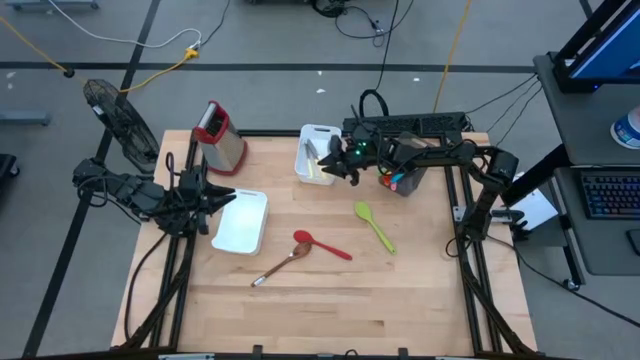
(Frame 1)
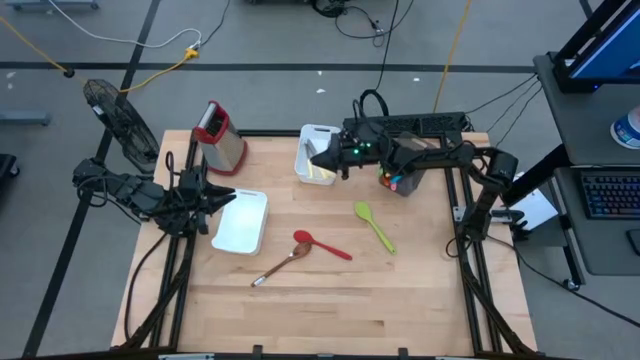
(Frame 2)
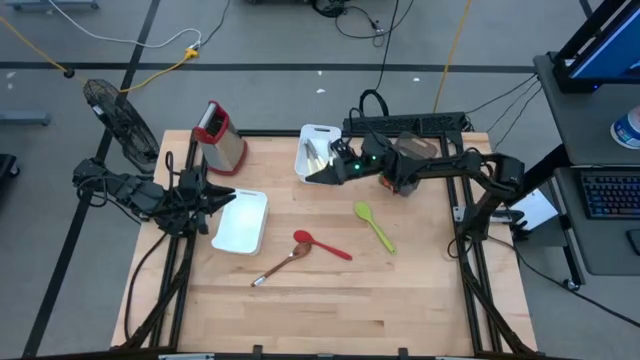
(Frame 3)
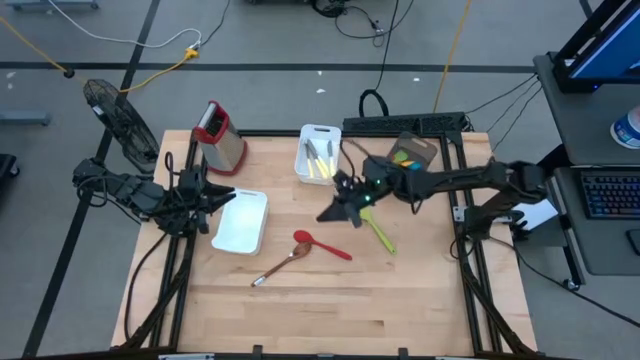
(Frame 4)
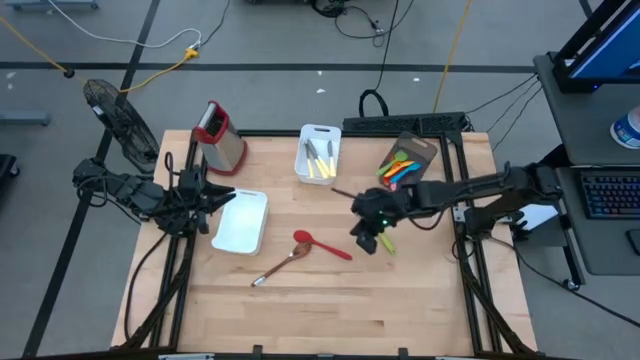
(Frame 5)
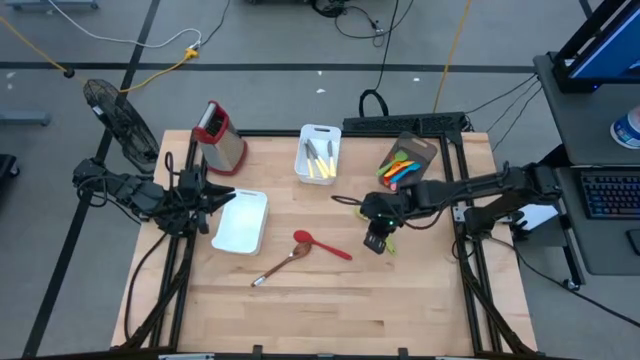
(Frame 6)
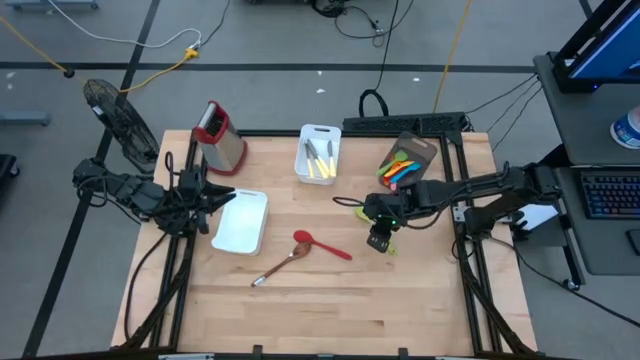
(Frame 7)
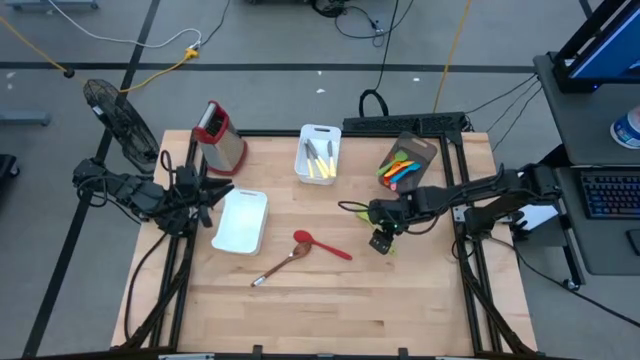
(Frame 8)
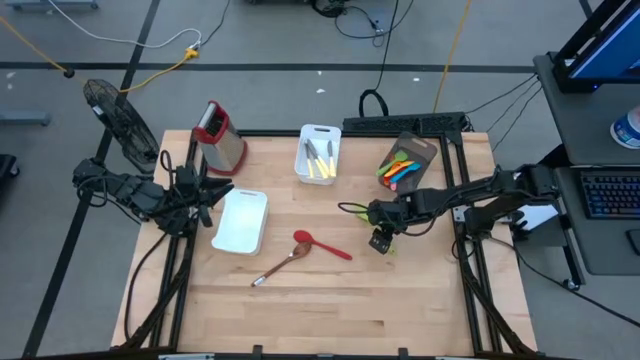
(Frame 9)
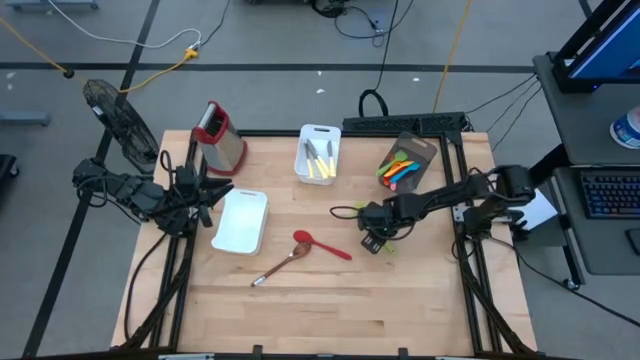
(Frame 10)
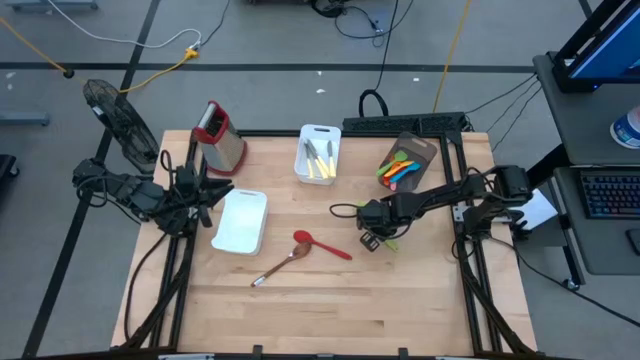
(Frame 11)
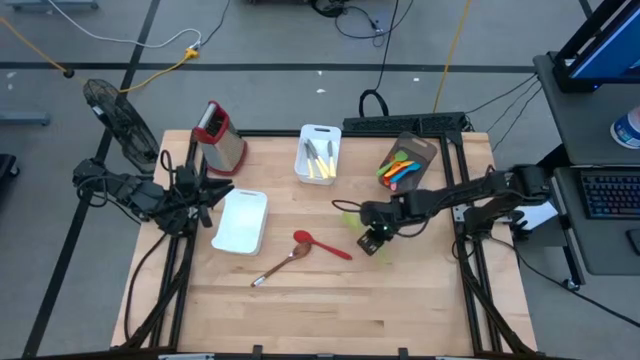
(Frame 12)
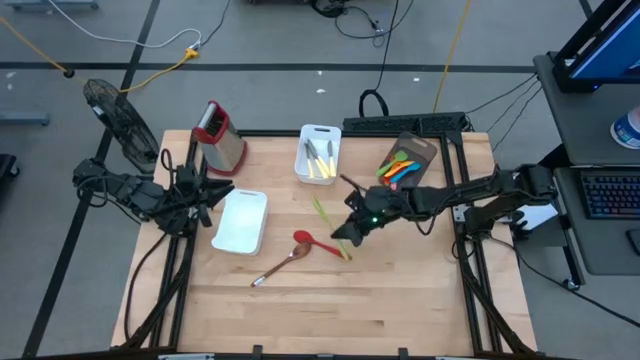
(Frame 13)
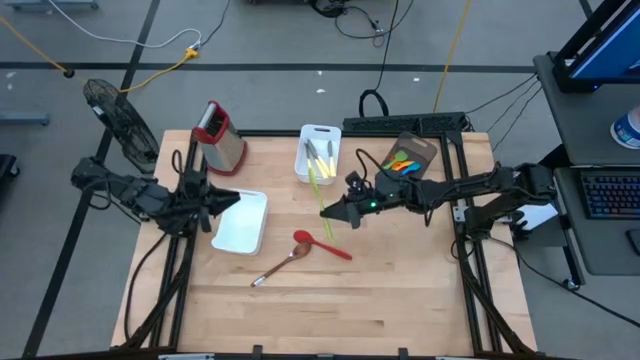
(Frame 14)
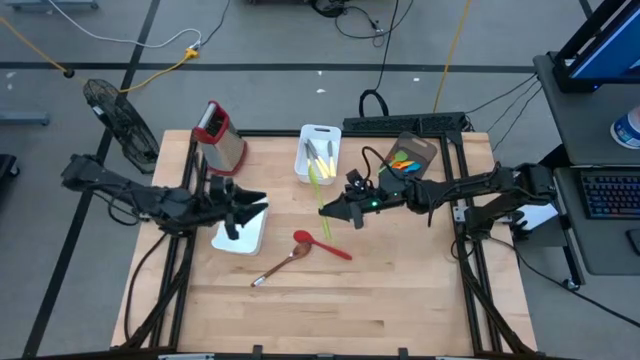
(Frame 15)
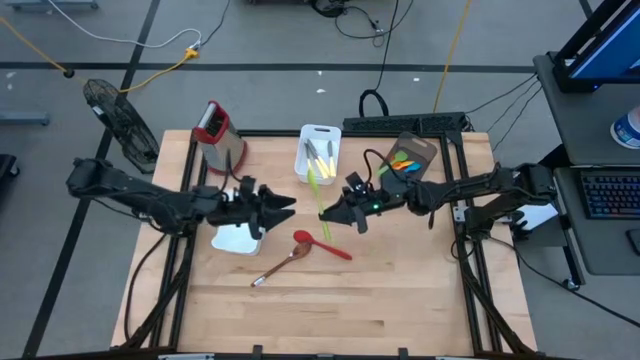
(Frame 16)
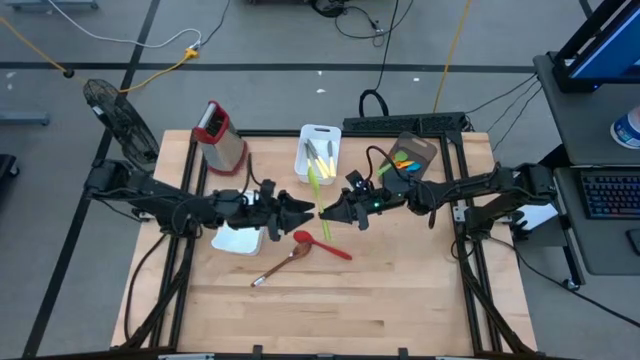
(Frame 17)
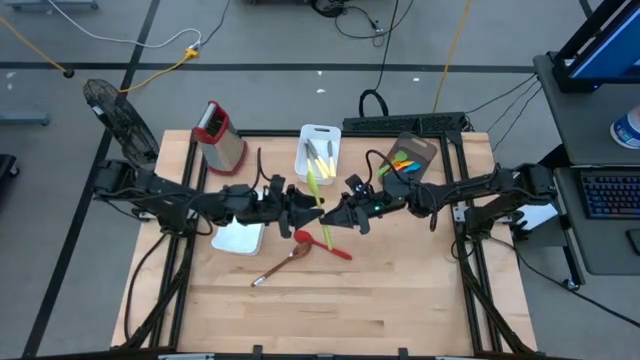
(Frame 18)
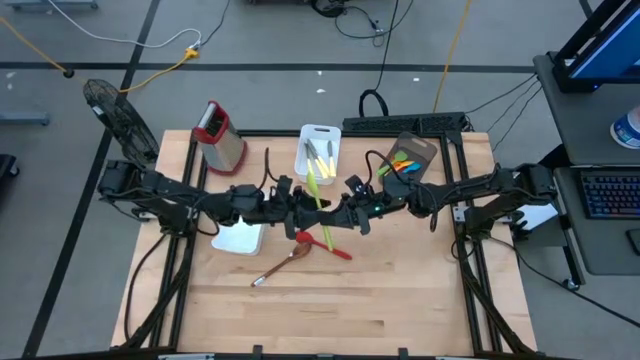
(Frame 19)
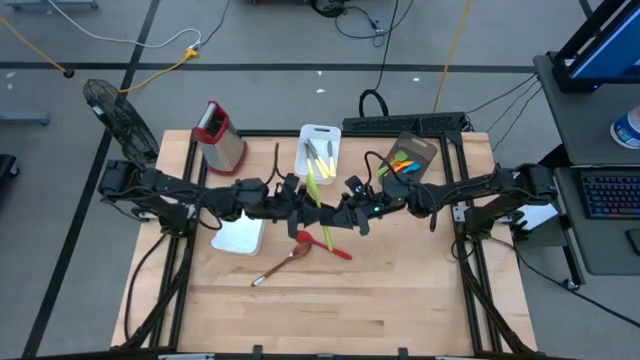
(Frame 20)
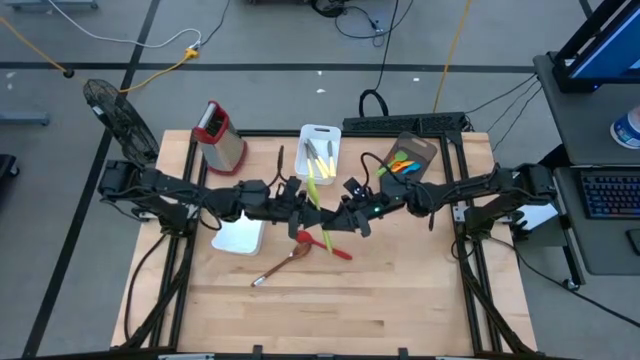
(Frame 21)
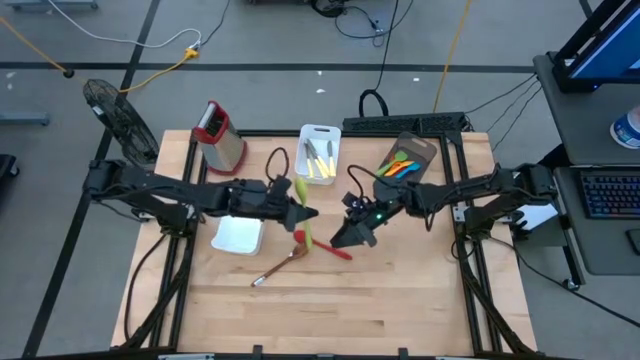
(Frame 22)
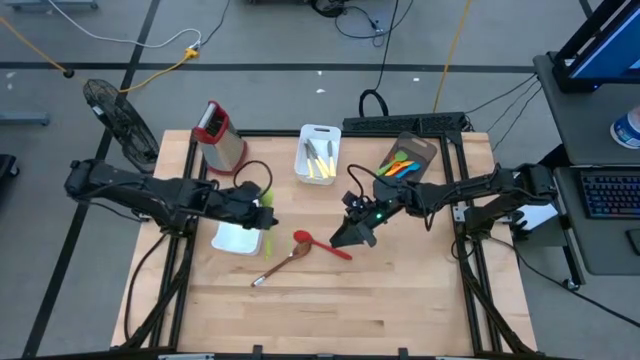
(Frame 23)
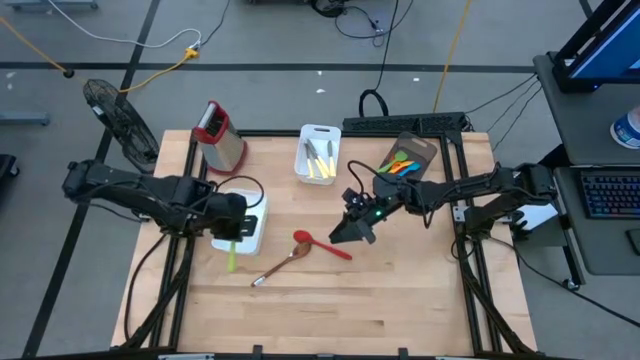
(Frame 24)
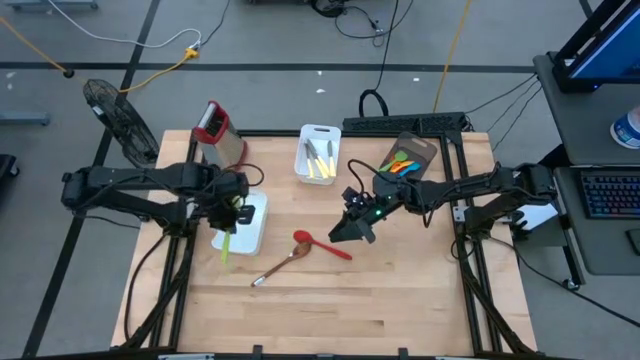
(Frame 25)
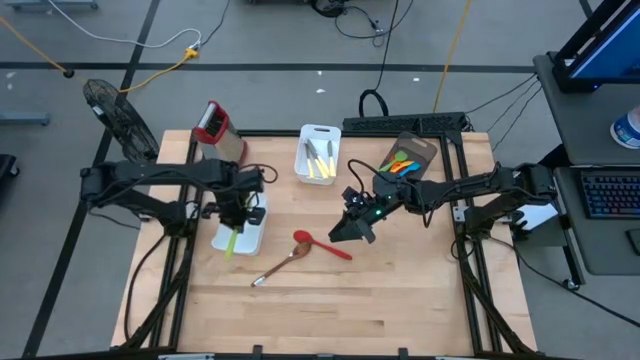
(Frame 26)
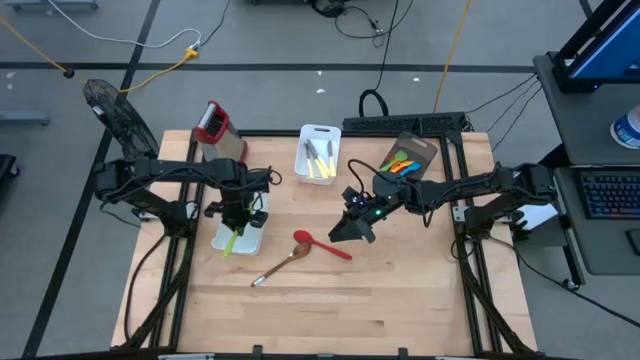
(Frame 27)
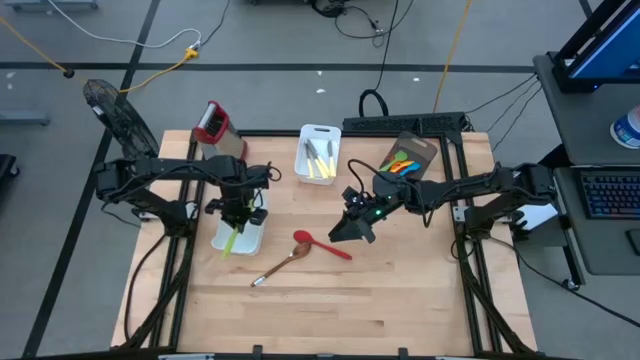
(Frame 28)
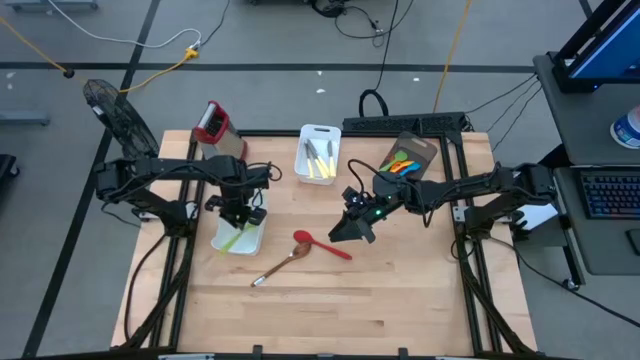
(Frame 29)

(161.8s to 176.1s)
Task: Pick & Place Kitchen Items
Put the green serving spoon into the bottom white bin

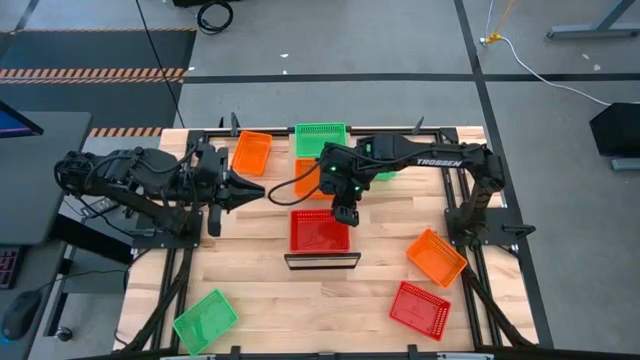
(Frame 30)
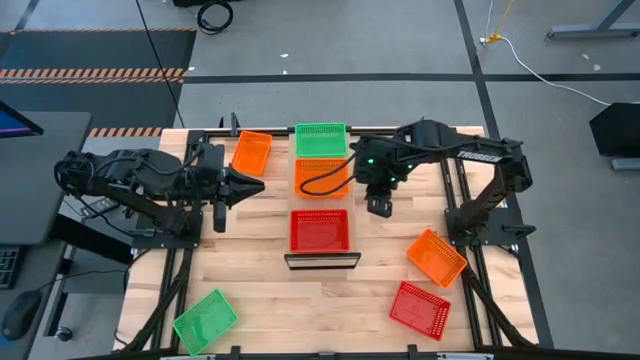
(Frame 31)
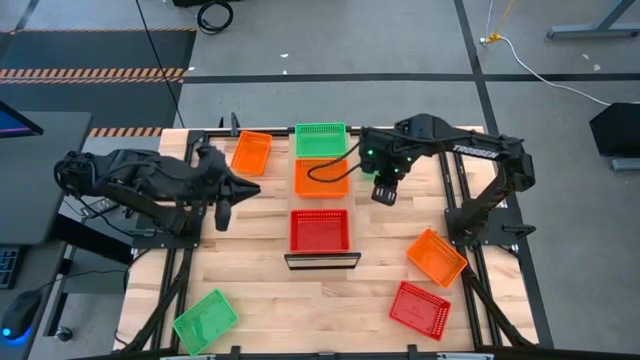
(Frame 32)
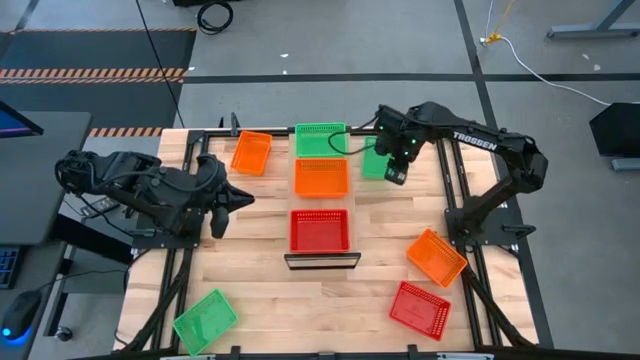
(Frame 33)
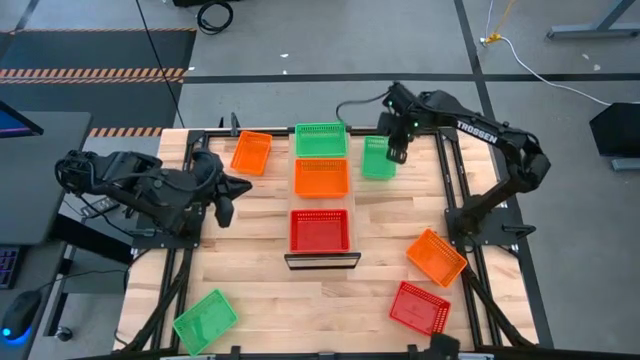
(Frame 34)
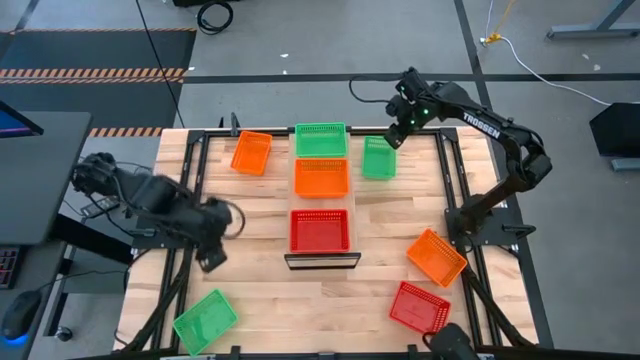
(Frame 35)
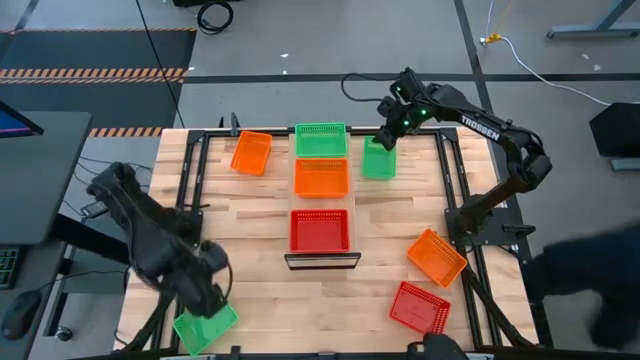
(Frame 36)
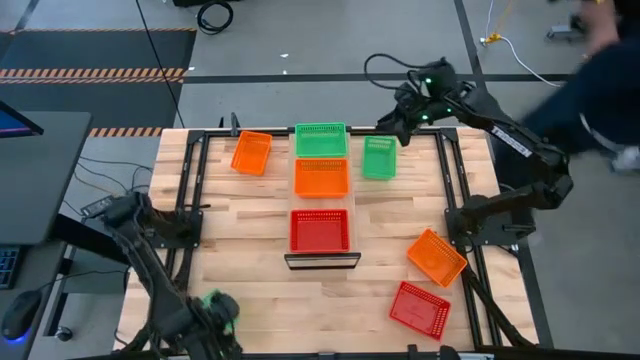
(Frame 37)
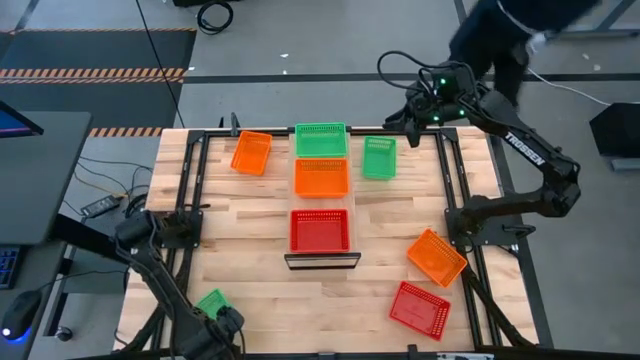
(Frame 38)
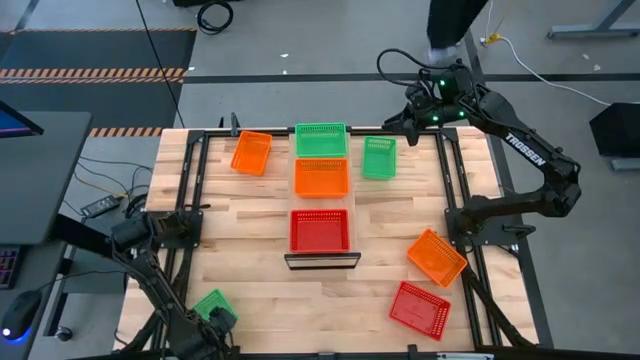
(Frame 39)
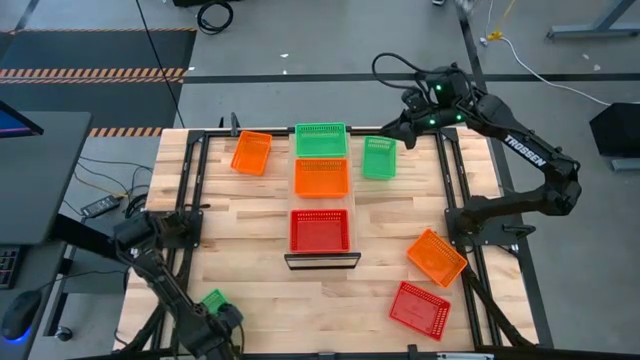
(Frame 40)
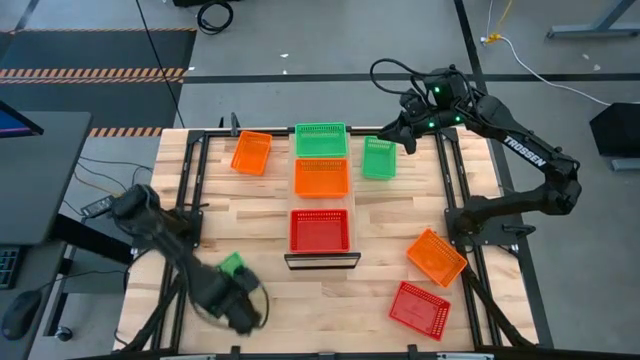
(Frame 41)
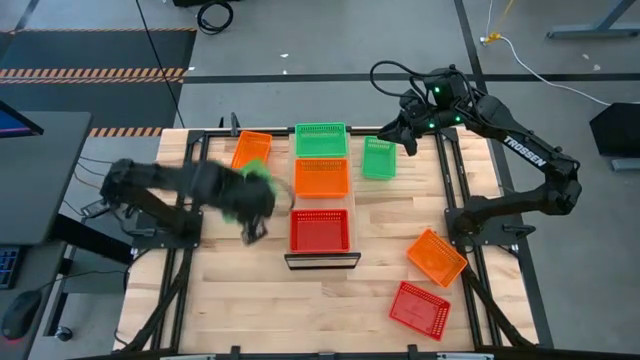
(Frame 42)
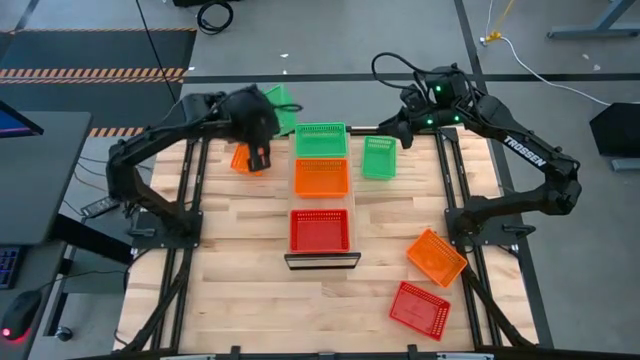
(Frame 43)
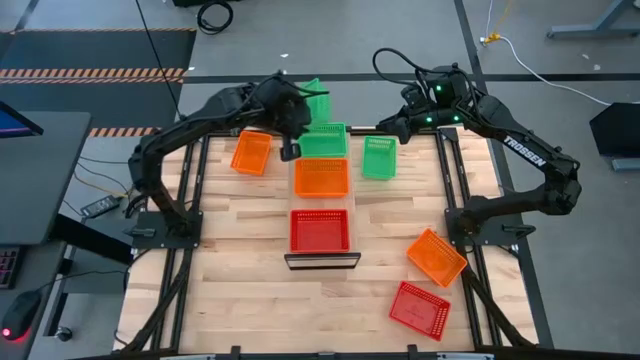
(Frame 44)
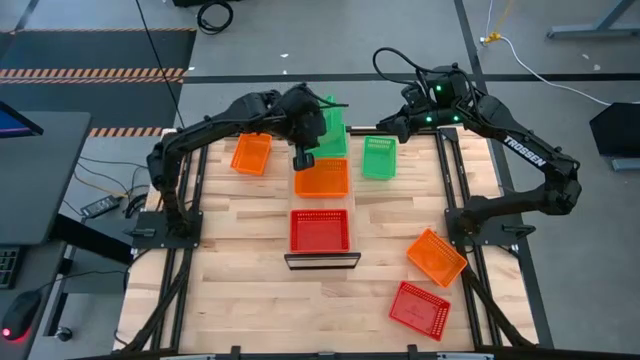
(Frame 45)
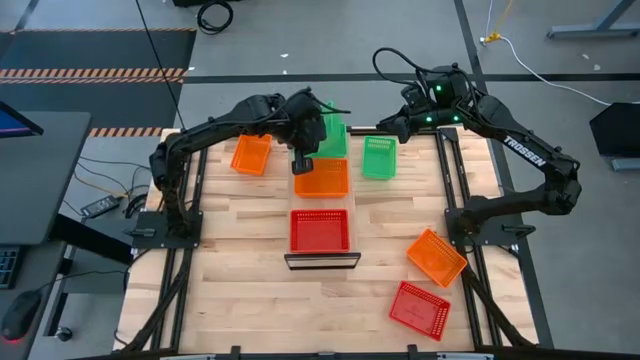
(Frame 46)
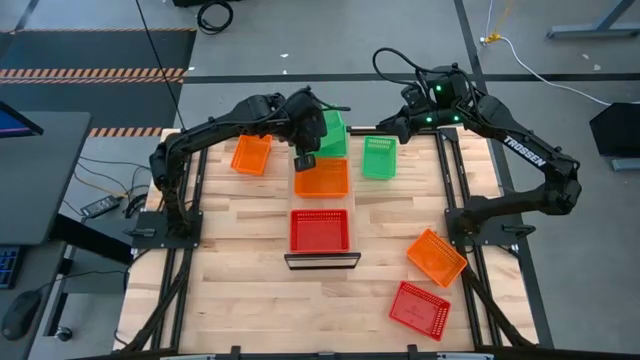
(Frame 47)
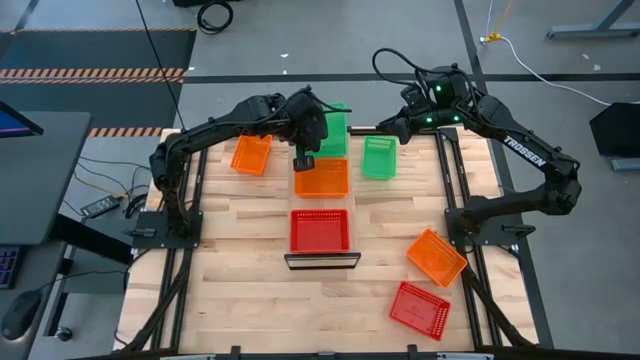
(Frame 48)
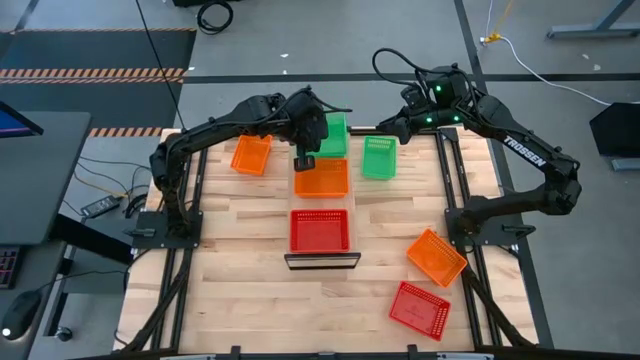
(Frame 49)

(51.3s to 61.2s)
Task: Stack baskets on shelf by color
Stack the bottom green bin on top of the green bin on the shelf
